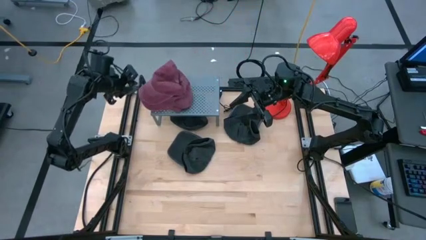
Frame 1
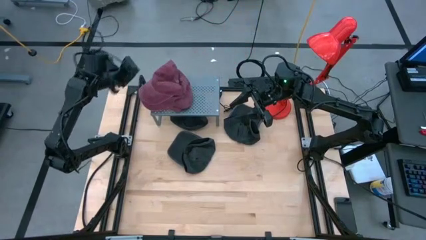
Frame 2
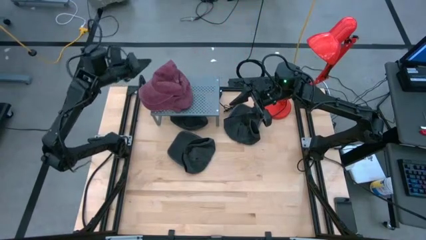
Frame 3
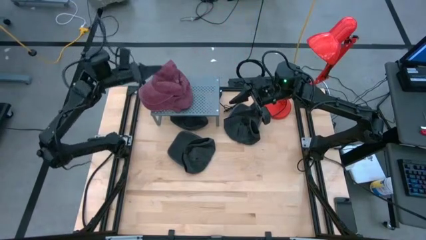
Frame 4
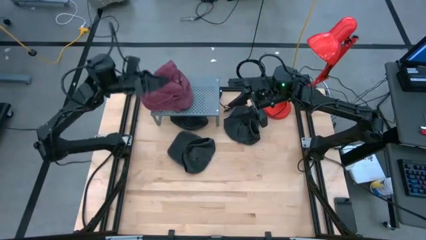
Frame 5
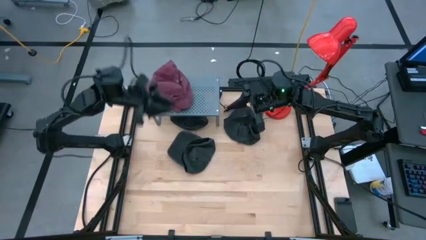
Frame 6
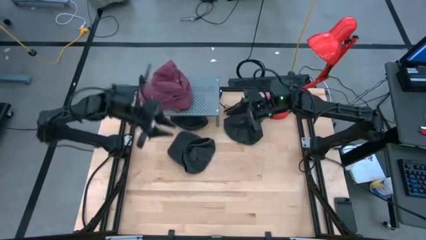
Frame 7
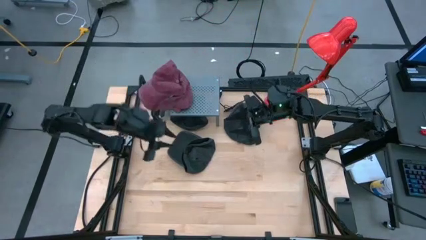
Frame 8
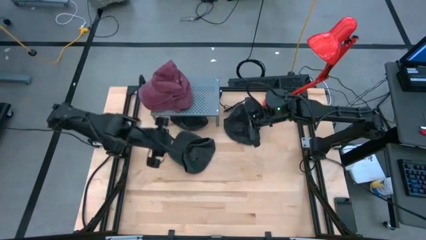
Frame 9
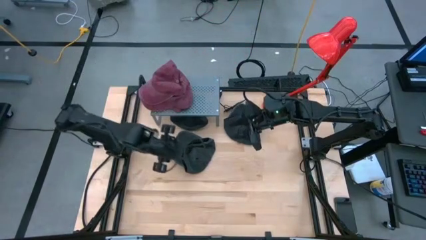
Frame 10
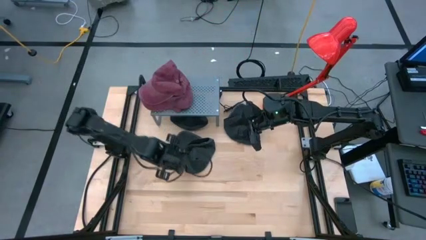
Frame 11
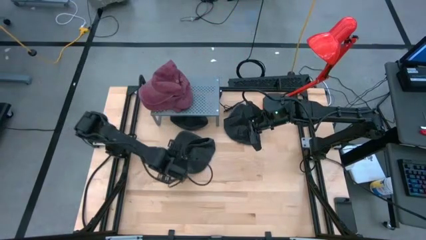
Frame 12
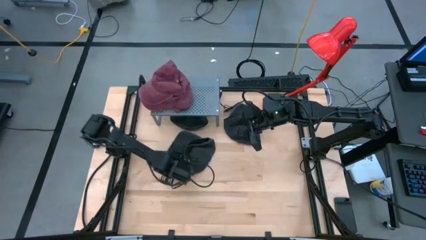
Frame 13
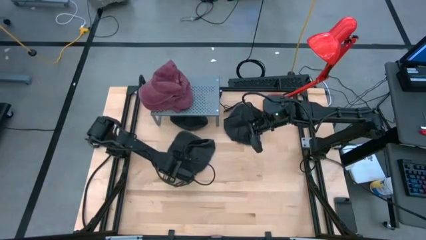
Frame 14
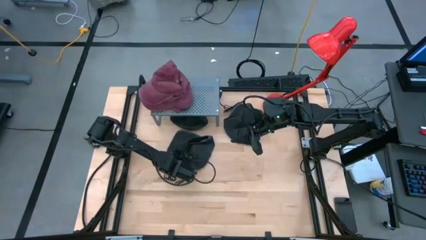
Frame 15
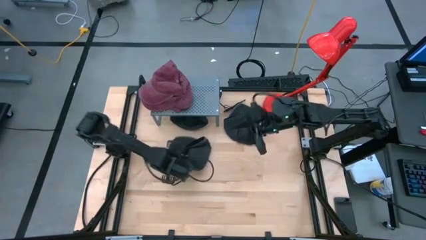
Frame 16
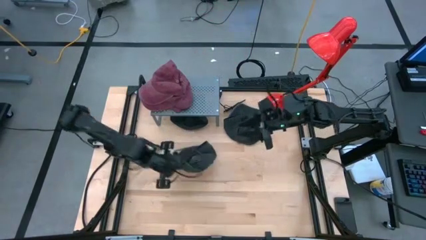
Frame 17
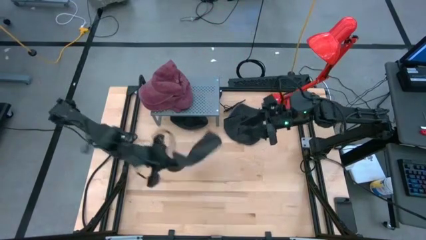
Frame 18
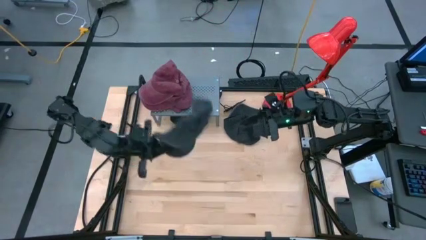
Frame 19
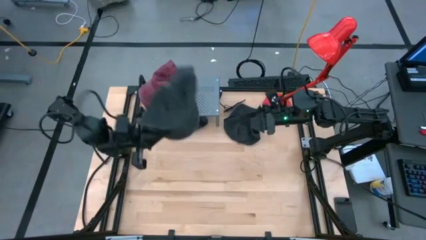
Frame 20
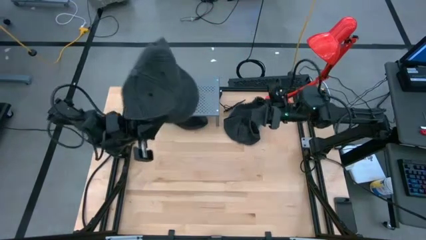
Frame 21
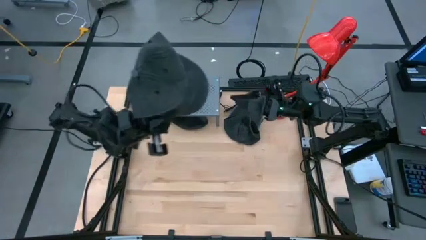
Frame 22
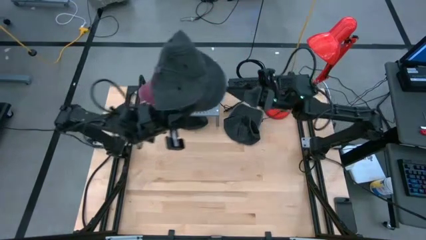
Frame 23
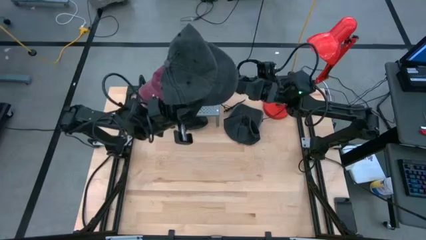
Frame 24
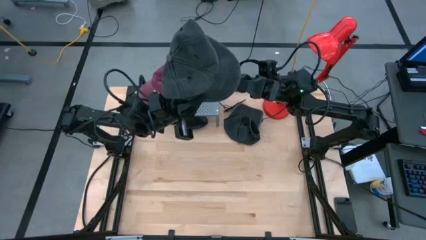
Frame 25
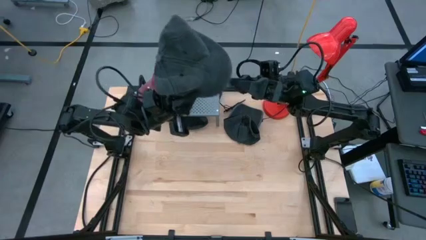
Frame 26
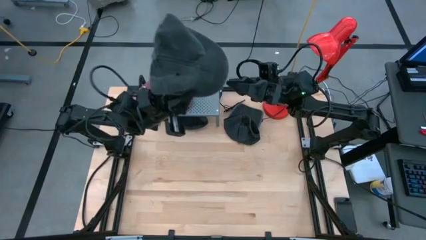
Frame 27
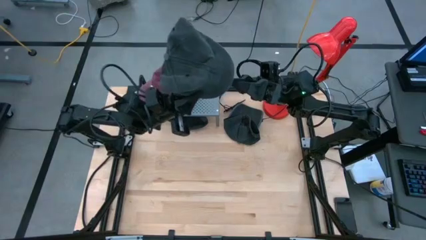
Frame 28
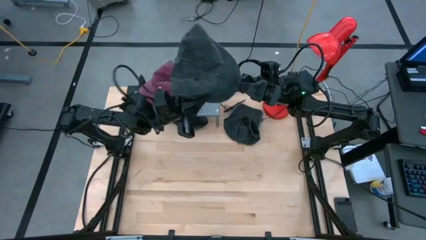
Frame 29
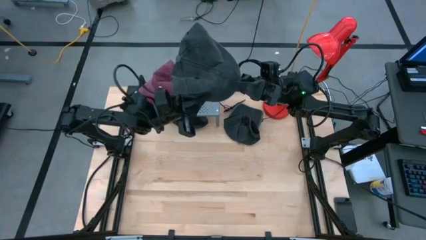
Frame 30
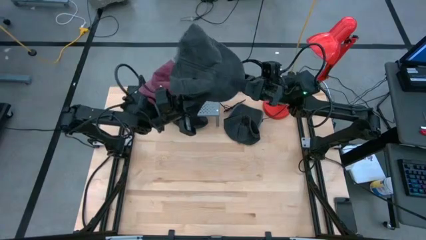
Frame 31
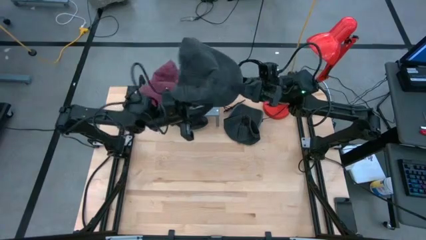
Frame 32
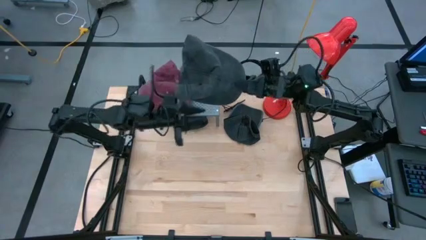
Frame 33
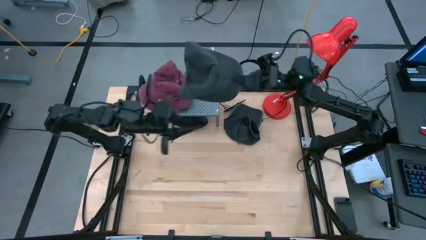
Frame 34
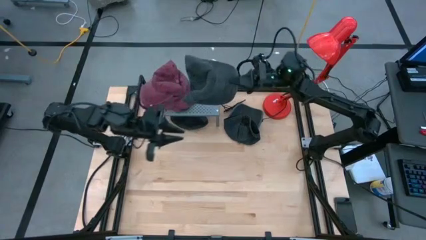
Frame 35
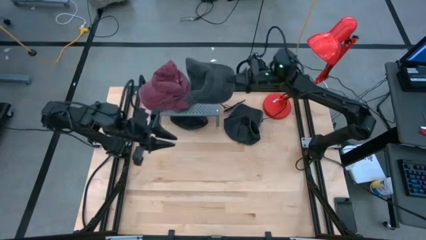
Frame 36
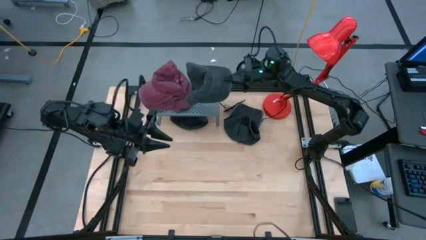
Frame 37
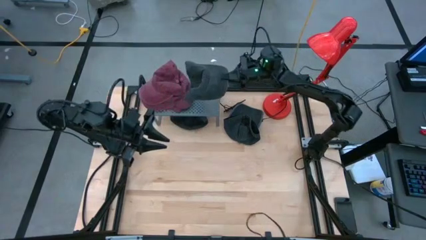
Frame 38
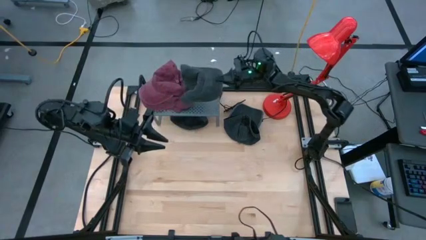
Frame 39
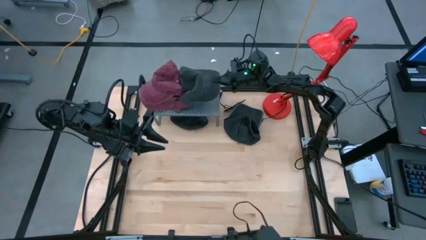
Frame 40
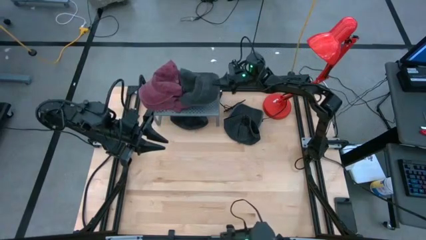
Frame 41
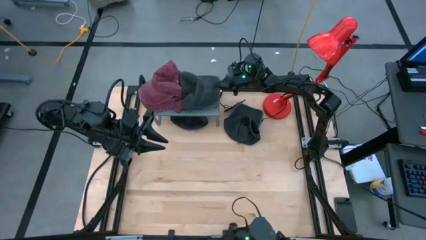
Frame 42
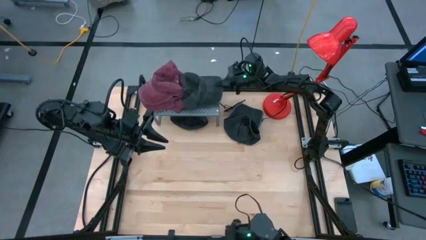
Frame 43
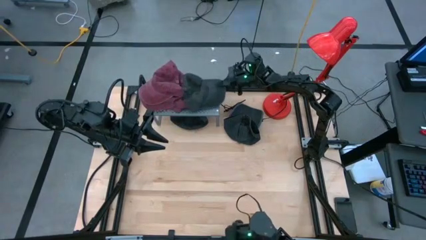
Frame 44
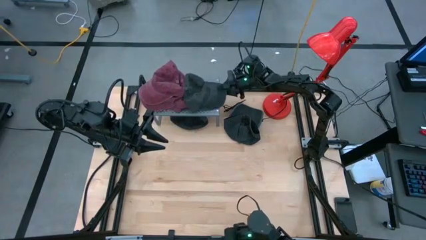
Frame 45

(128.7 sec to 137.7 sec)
Task: Pick & Place hat
Put the bottom black cap on the shelf

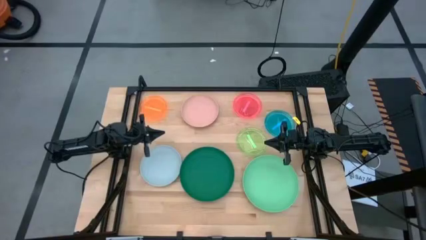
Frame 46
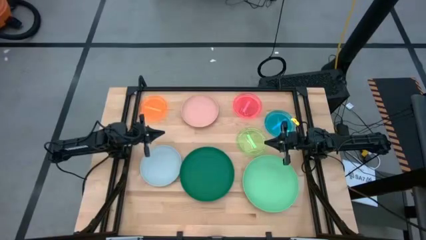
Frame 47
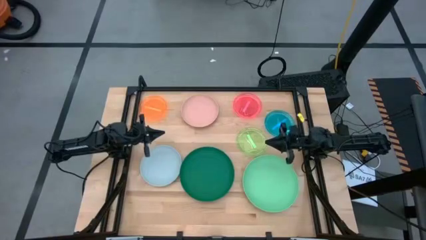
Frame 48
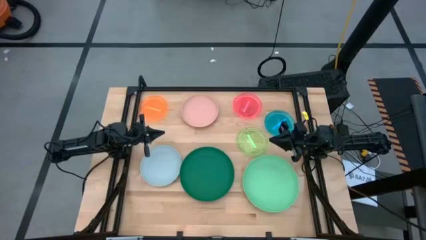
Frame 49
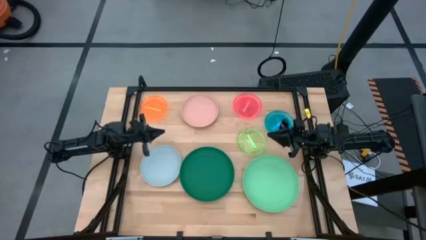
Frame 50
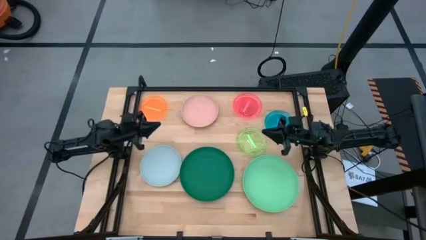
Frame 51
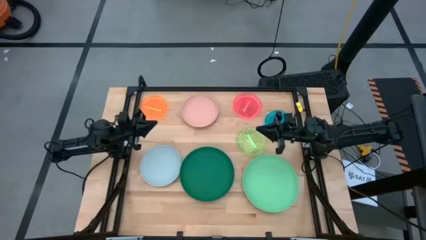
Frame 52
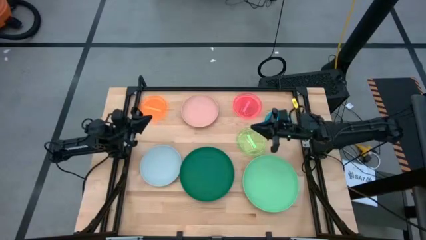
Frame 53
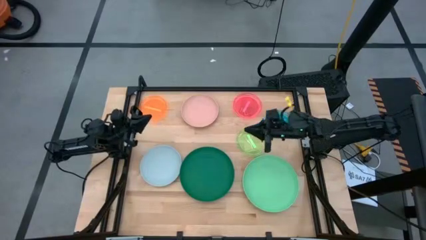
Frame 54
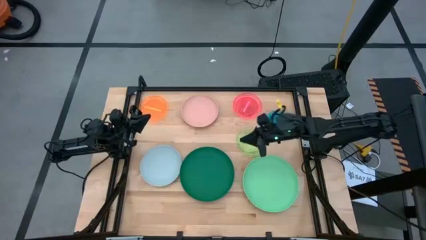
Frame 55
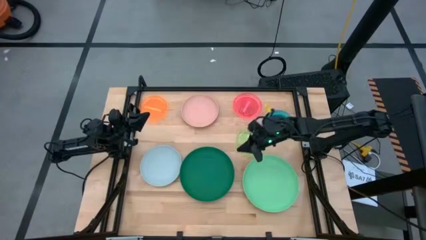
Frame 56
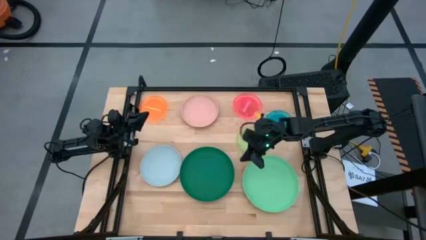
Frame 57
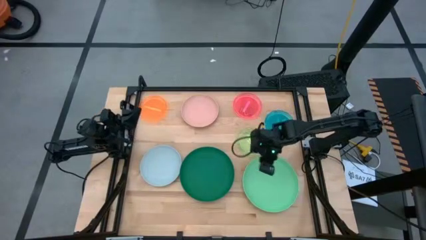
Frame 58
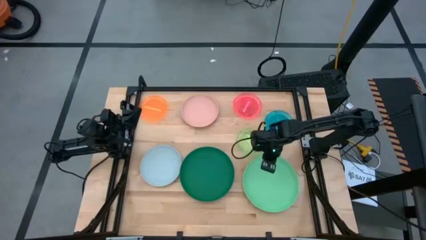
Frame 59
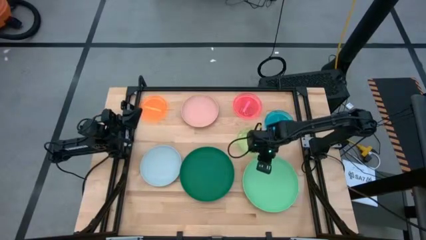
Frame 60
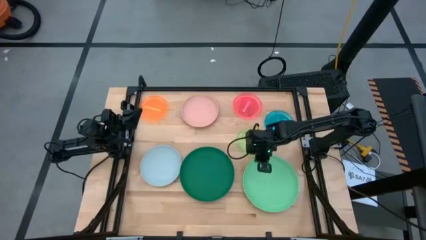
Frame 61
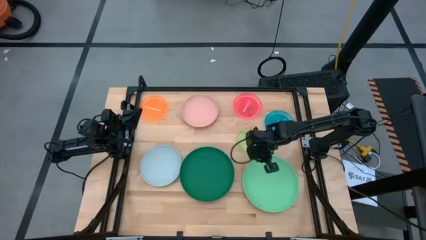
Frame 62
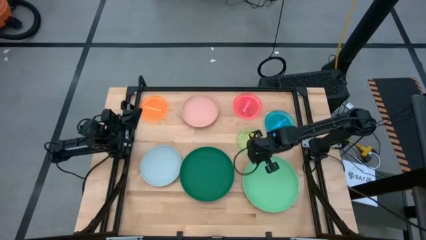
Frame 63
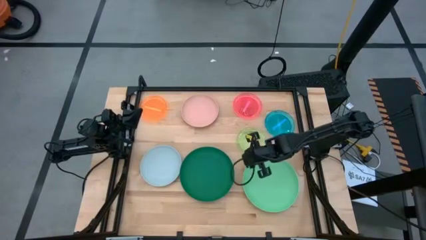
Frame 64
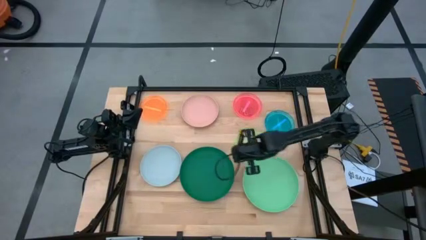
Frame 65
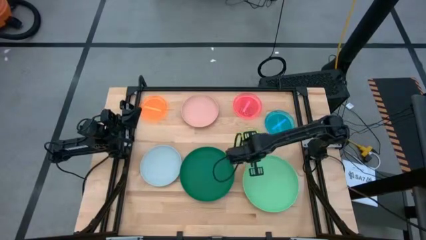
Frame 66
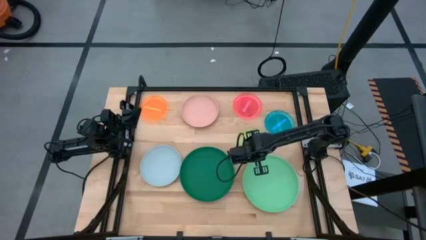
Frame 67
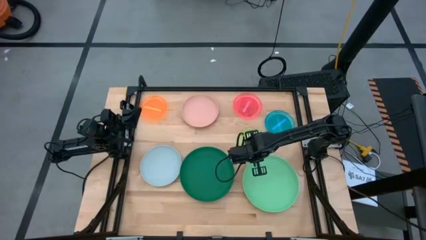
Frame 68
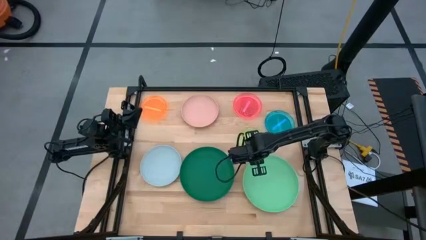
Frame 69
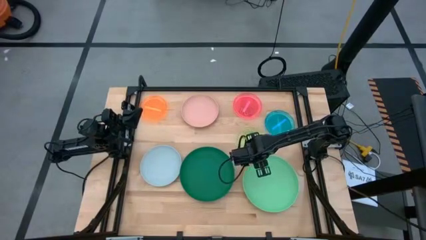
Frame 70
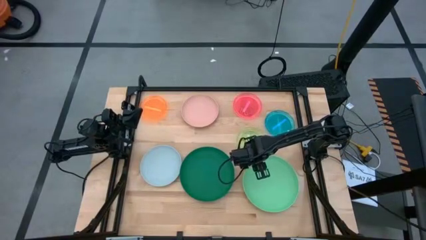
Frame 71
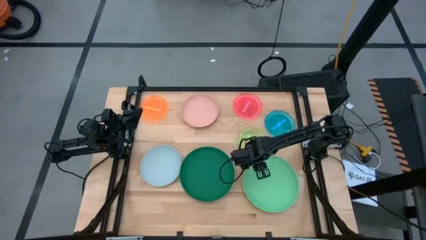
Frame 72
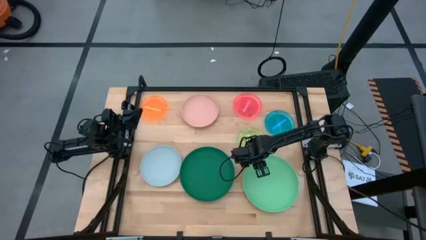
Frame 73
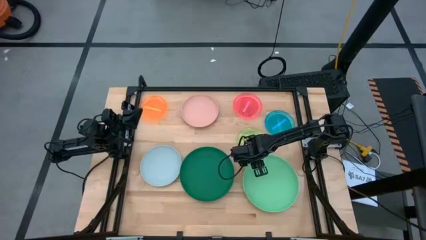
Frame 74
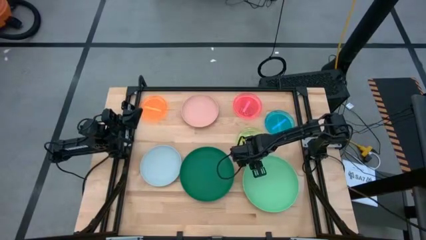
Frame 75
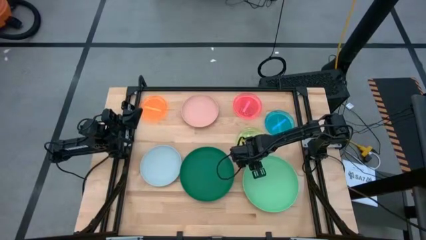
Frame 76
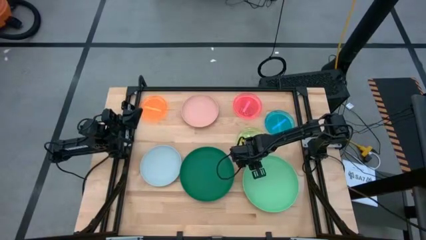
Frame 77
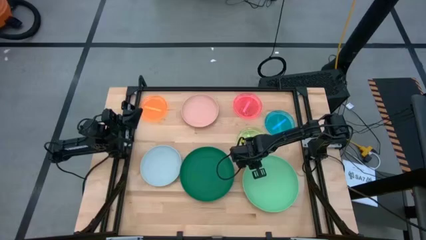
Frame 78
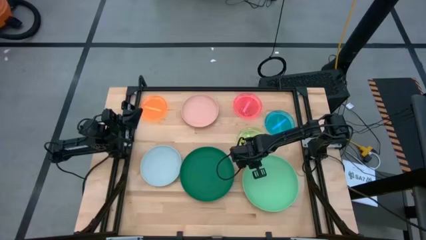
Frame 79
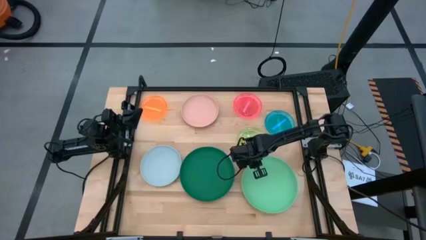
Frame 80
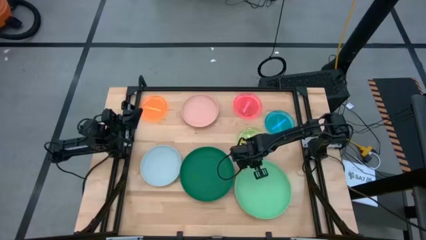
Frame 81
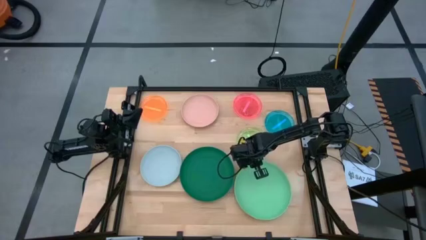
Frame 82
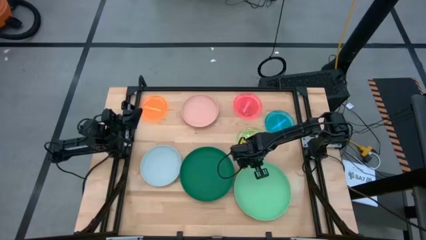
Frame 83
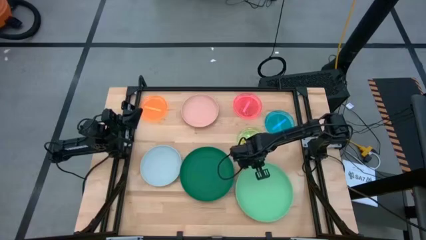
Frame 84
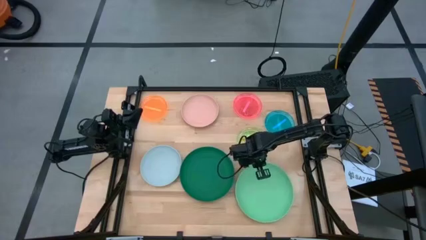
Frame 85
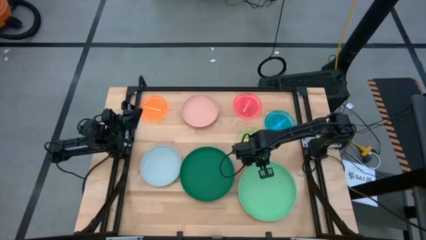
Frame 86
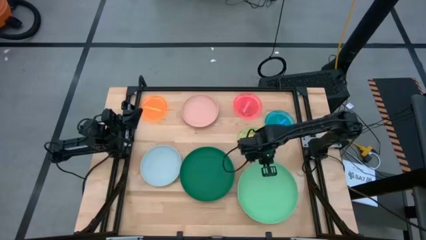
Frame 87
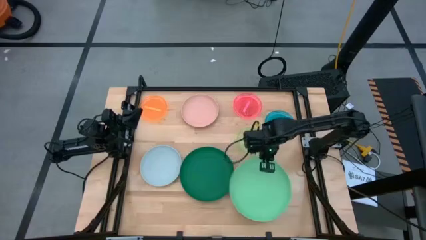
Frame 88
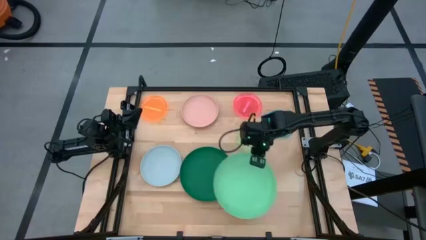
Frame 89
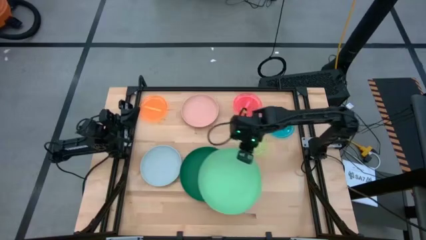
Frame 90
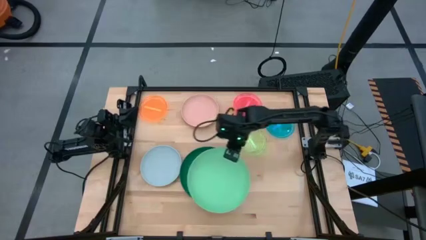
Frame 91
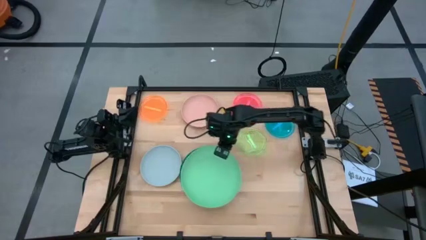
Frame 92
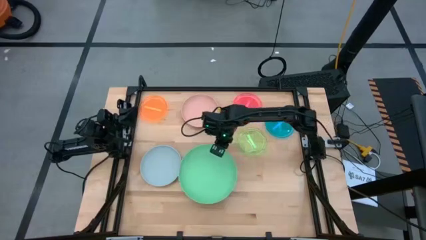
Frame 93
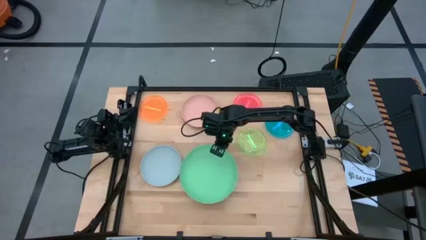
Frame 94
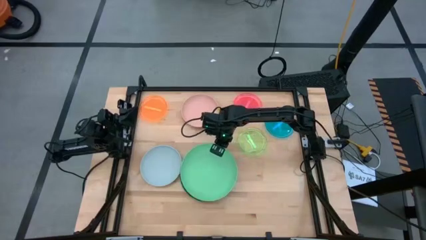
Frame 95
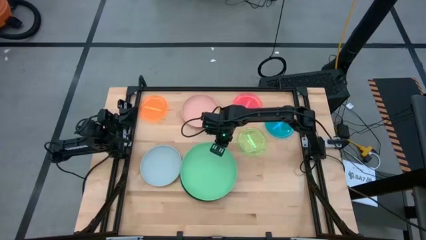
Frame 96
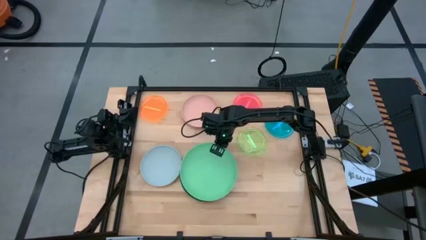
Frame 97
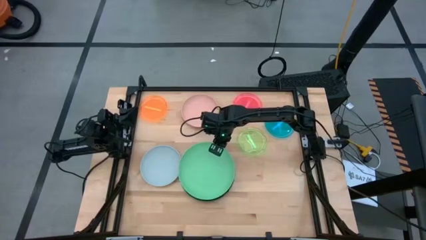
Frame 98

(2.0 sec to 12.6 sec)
Task: Stack plastic plates
Stack the large light green plate on the large green plate
